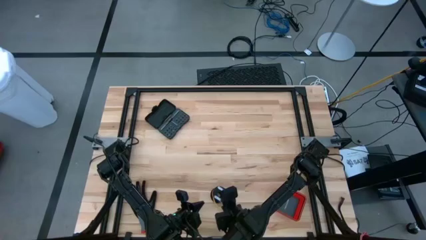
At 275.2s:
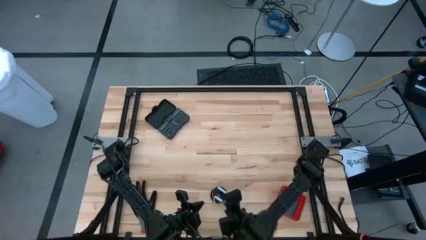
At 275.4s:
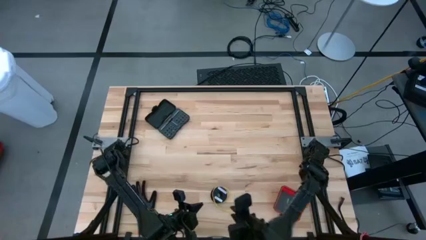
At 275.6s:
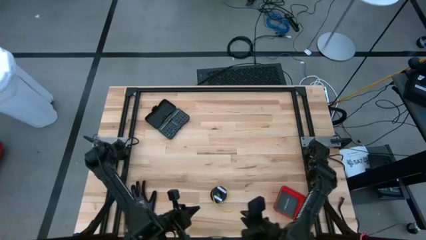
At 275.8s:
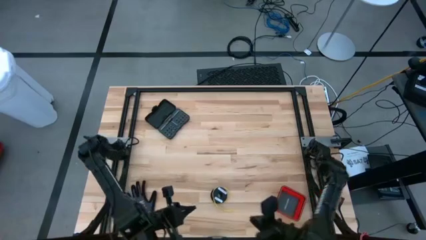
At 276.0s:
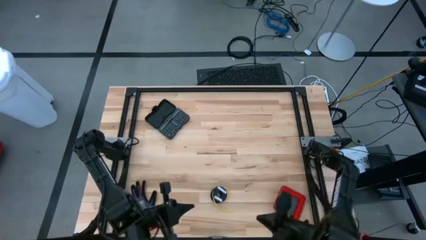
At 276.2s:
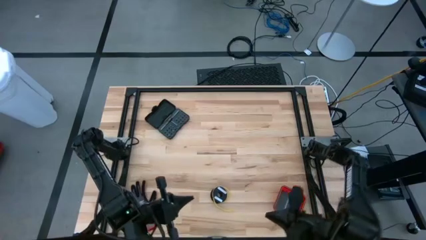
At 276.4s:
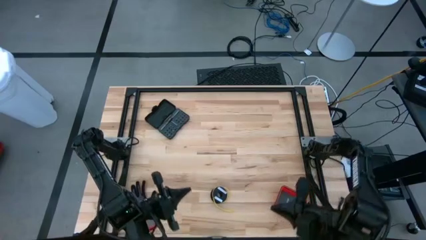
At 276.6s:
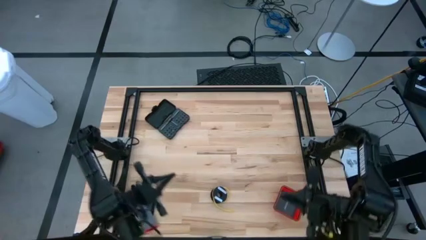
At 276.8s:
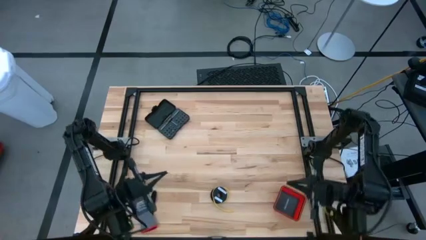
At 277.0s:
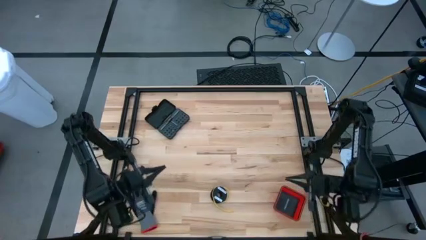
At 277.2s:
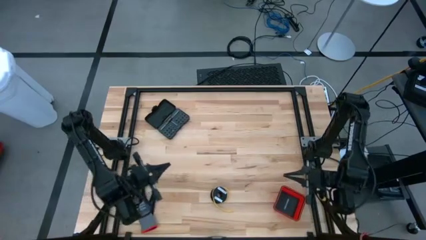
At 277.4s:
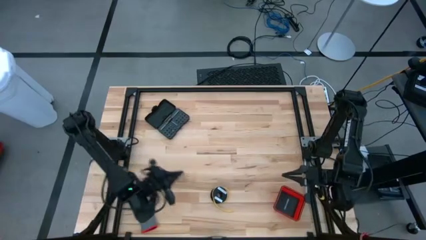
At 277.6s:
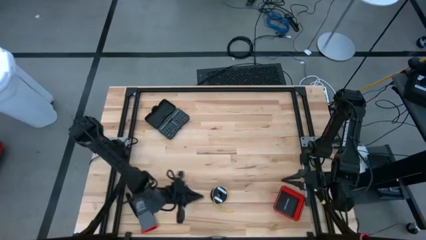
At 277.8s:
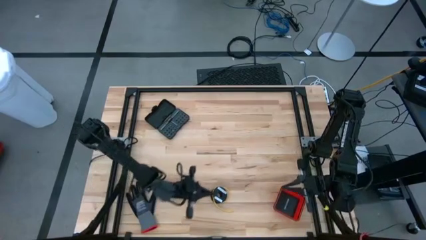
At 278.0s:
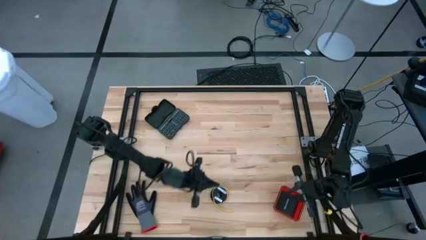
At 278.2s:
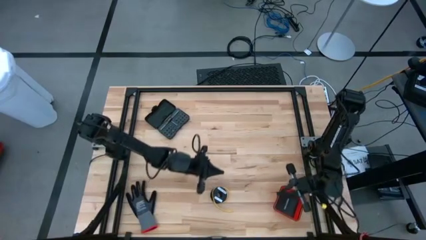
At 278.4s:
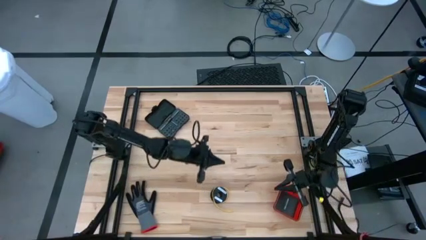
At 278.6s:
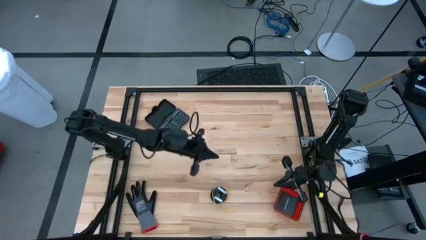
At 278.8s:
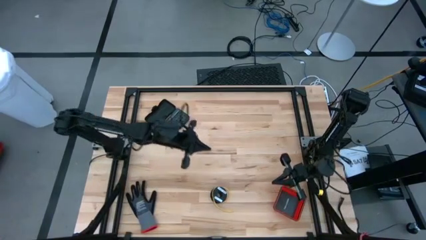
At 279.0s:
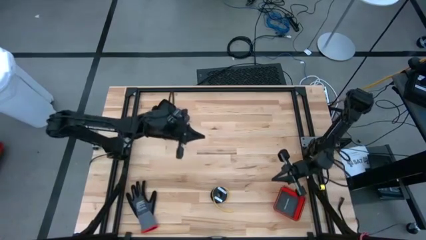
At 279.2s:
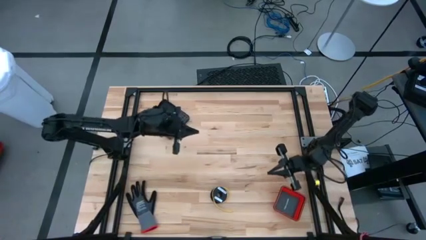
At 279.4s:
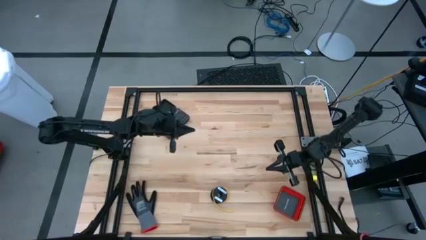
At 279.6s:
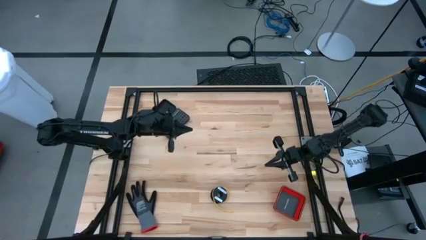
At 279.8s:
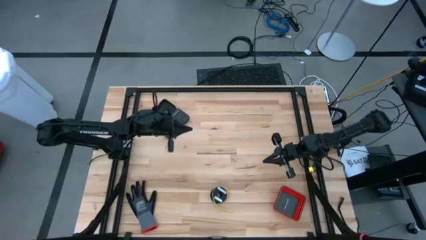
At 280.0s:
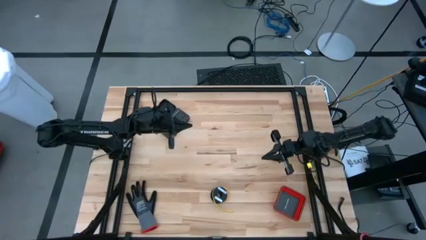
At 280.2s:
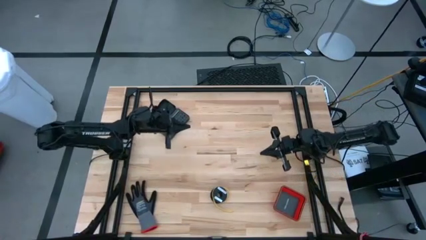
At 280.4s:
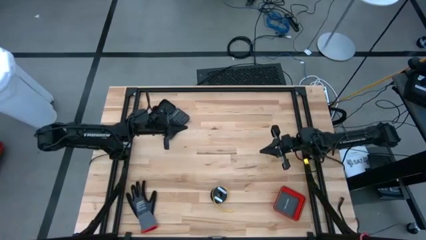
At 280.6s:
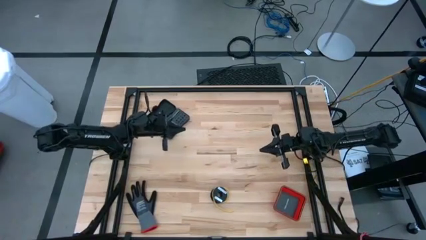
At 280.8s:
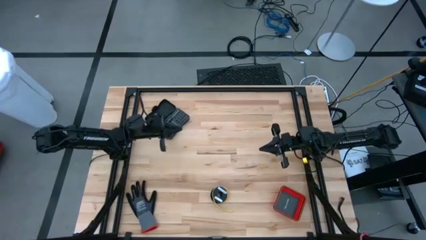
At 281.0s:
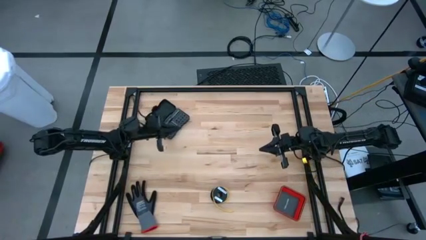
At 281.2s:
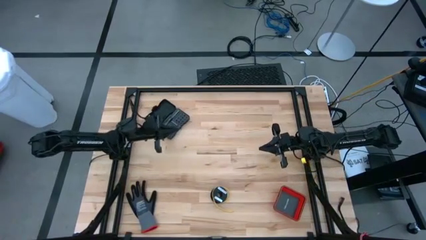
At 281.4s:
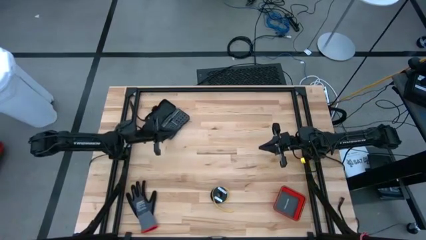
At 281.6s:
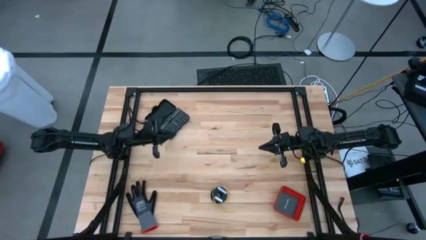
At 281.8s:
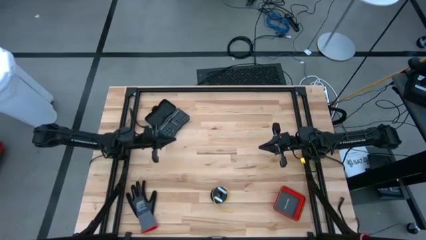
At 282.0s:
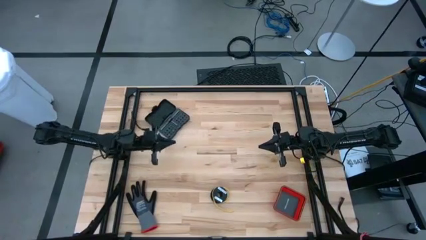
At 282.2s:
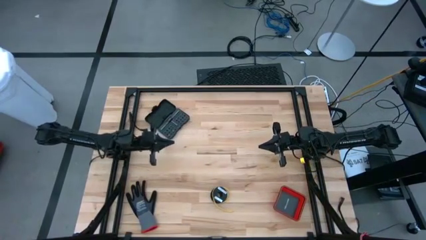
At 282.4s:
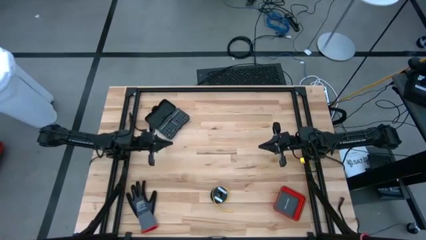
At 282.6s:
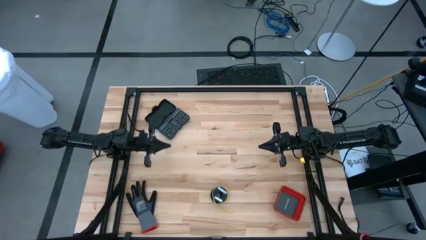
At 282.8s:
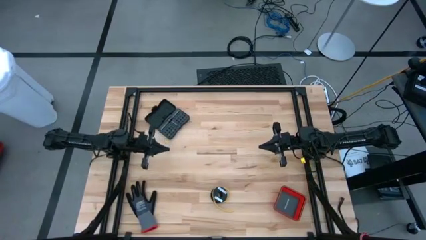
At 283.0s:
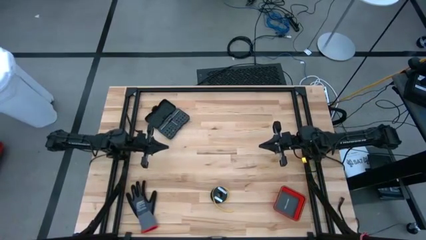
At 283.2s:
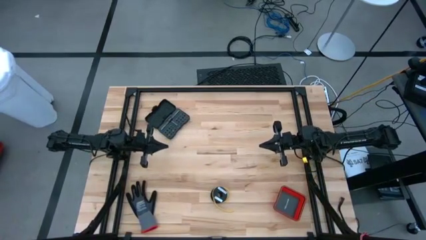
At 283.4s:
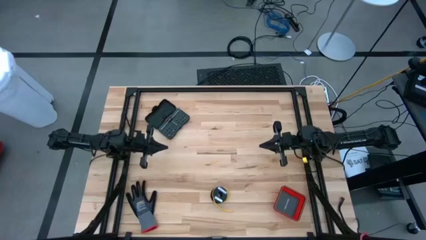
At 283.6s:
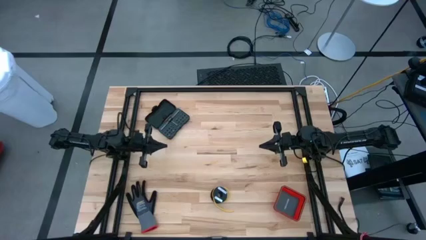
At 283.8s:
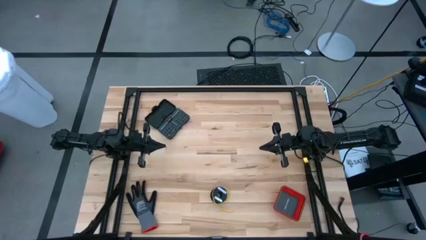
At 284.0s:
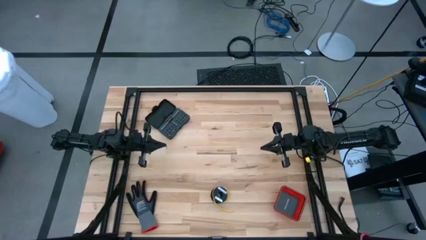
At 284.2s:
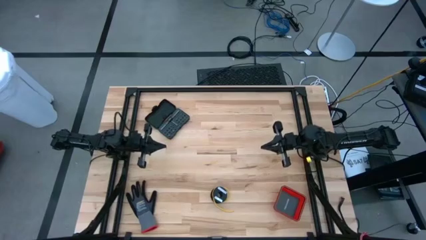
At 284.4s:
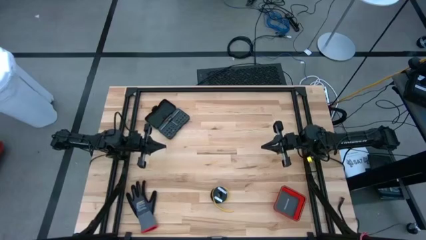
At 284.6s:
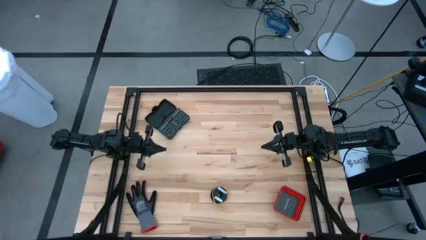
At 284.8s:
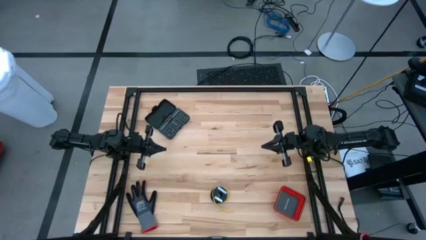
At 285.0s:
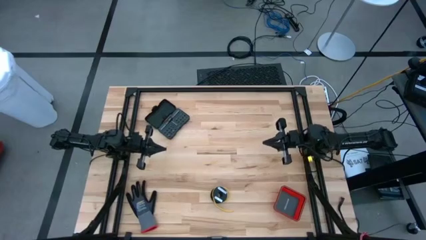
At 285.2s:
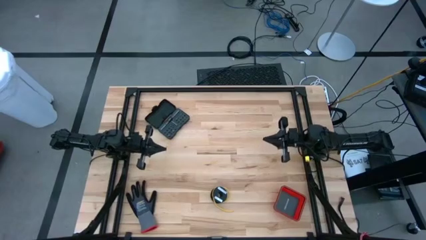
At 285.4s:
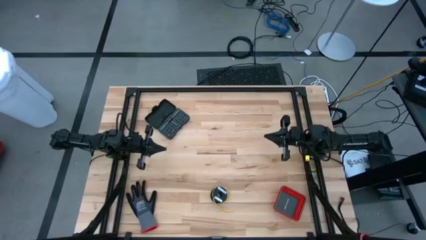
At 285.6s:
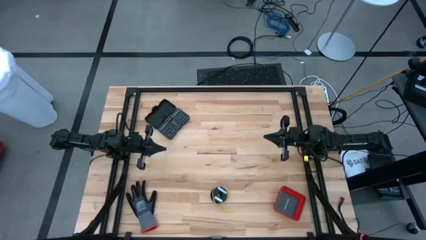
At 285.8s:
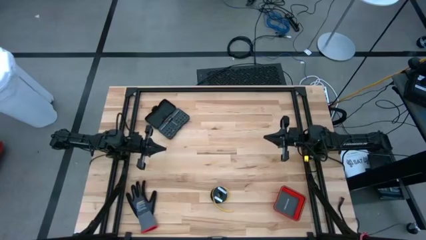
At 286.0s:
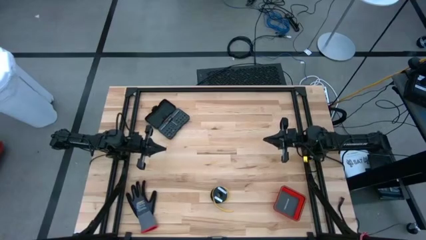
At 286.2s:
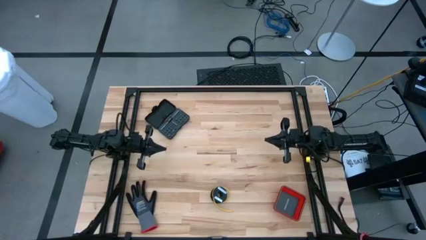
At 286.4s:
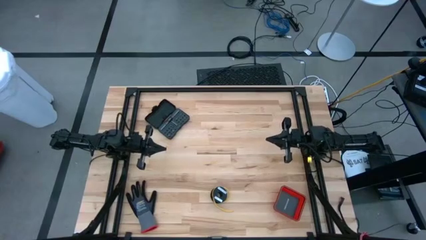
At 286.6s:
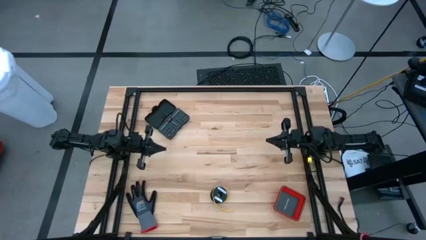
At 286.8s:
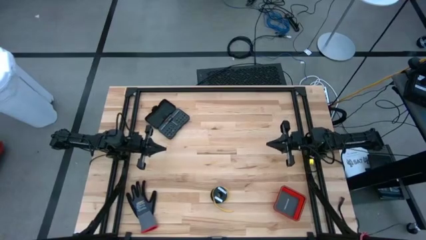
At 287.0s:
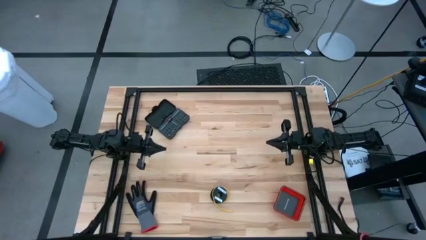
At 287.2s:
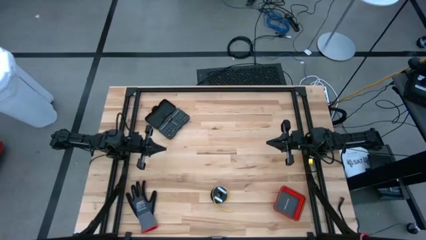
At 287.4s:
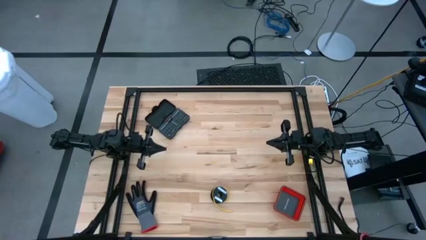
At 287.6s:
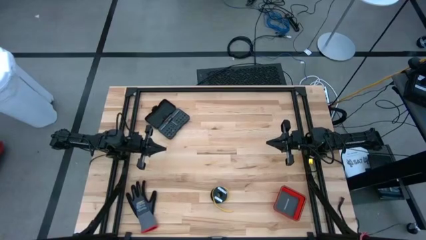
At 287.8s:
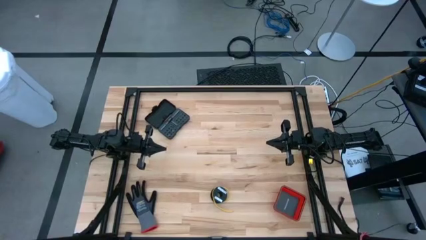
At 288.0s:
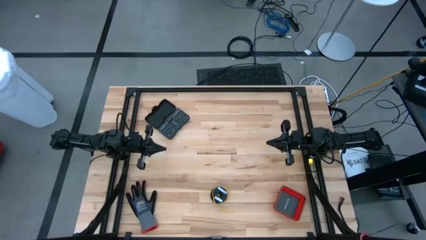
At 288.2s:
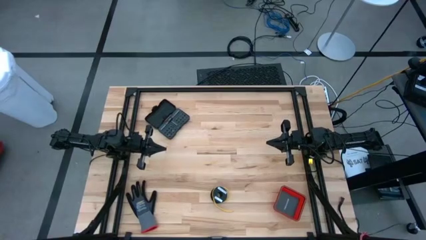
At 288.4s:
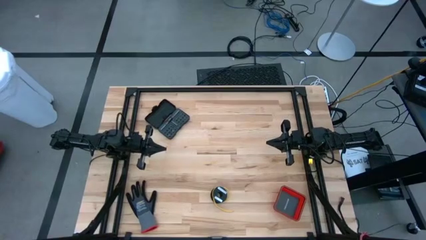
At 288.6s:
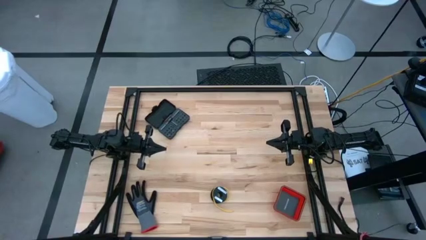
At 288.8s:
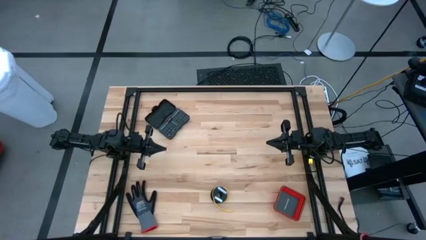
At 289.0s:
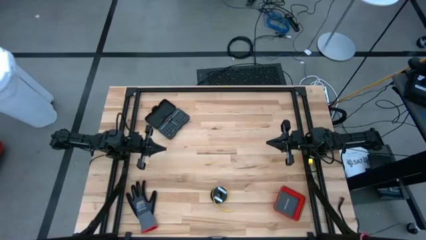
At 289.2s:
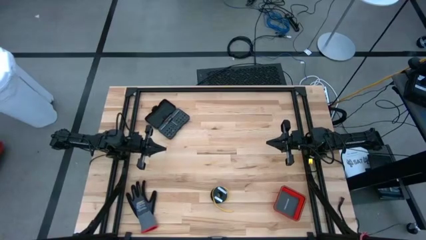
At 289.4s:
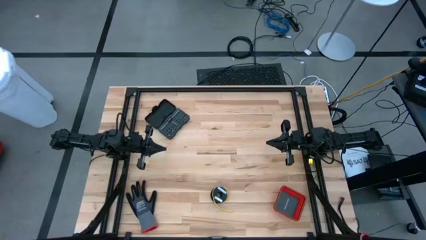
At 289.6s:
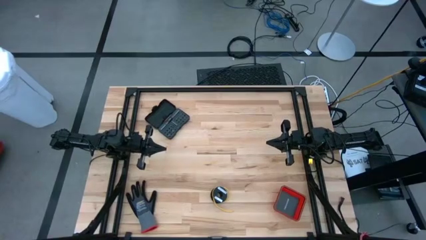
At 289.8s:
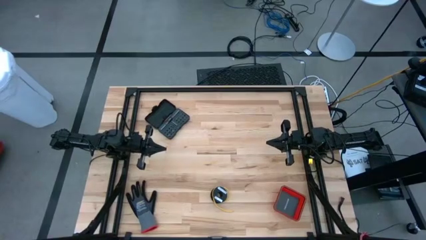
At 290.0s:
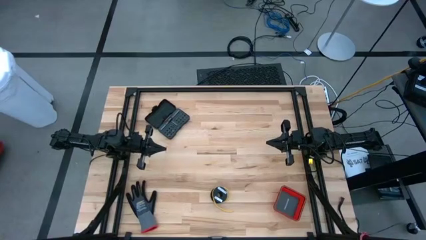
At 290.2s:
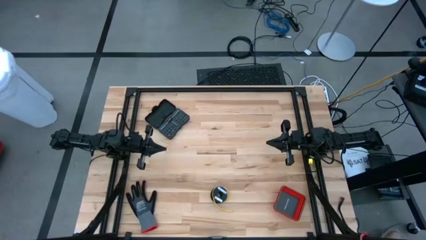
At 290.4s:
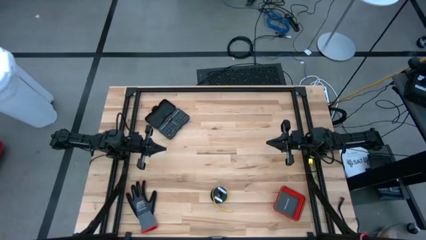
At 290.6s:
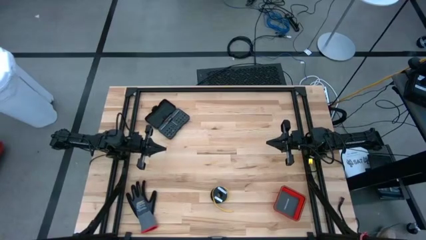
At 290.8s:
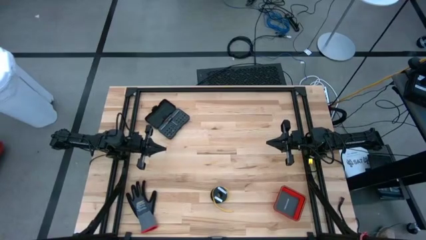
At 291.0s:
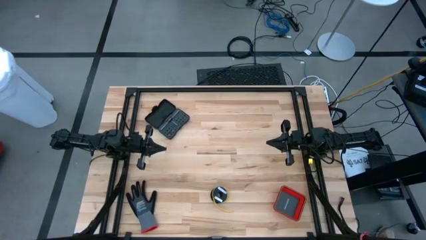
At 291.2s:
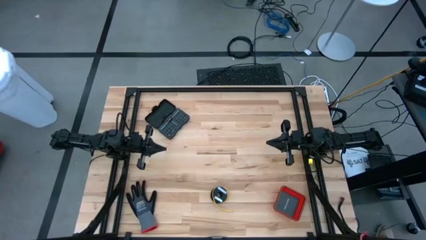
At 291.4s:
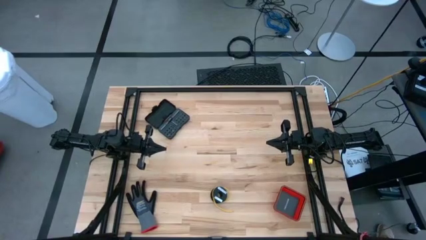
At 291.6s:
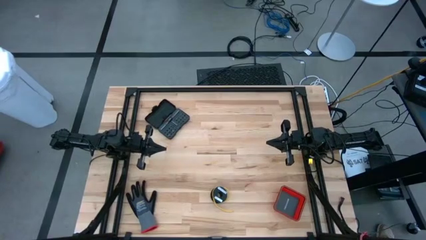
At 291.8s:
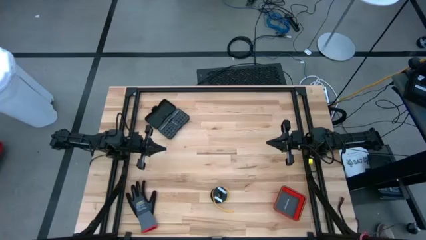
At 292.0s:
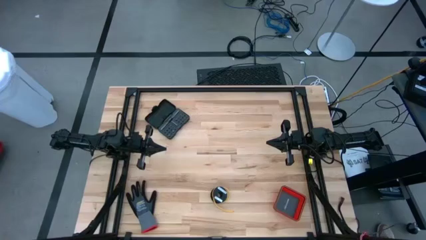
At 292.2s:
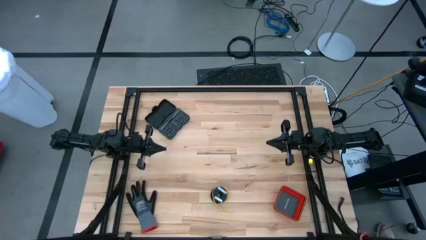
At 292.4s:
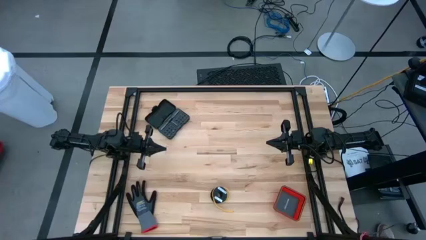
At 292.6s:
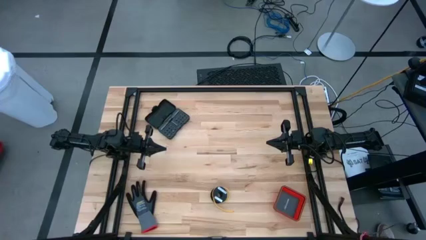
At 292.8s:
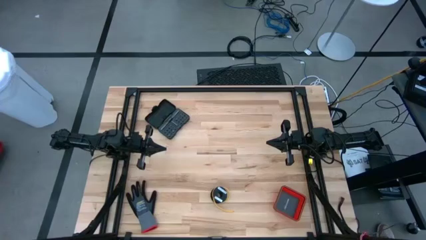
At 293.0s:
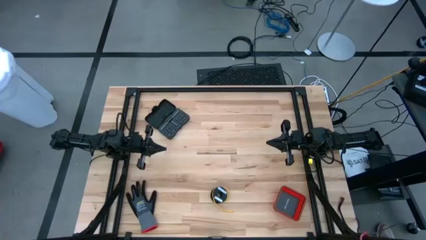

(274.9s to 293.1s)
Task: Coil cords
Return to Home Position
